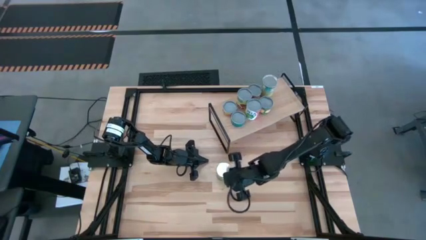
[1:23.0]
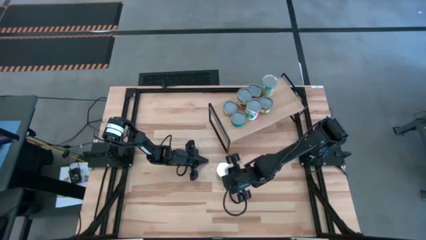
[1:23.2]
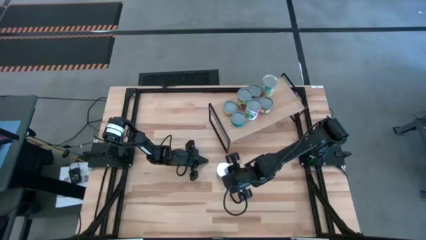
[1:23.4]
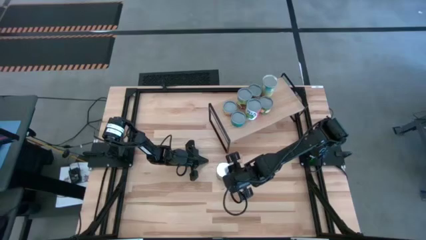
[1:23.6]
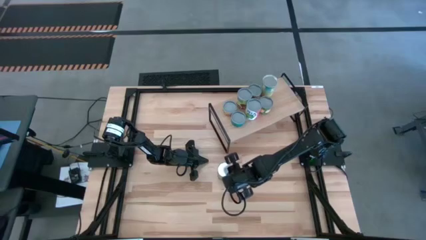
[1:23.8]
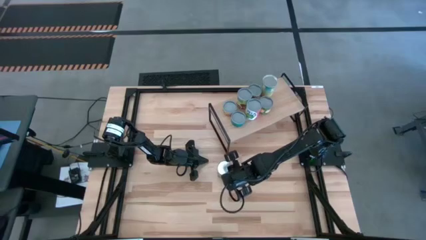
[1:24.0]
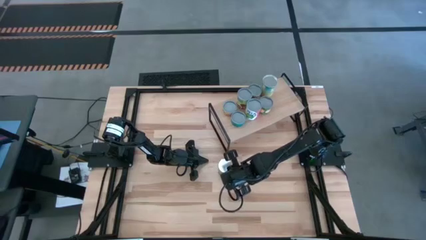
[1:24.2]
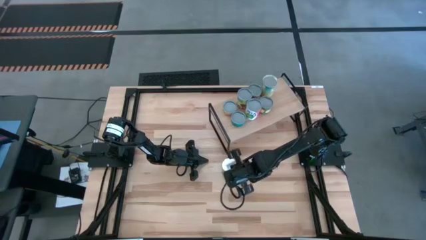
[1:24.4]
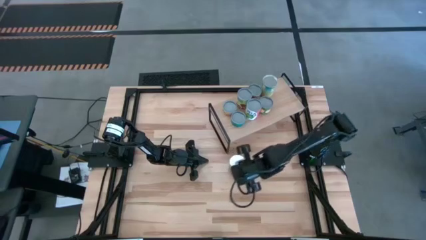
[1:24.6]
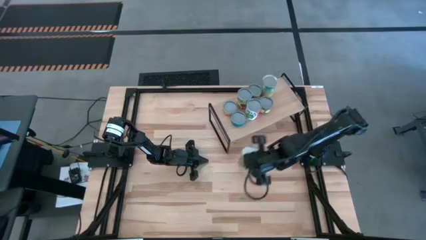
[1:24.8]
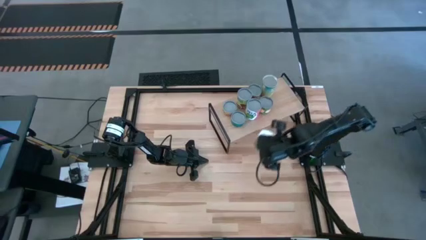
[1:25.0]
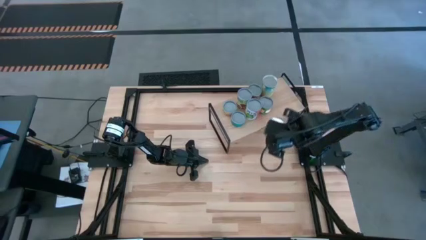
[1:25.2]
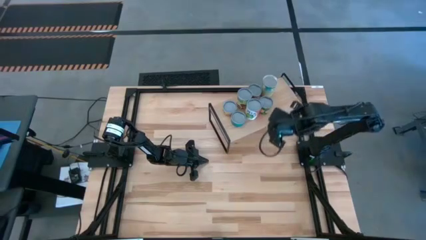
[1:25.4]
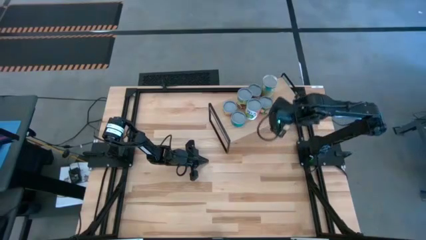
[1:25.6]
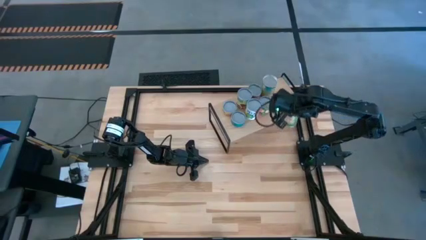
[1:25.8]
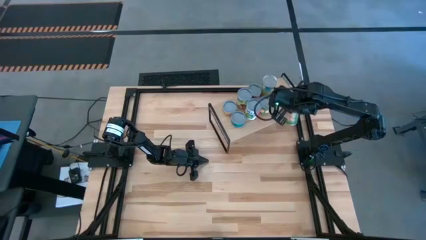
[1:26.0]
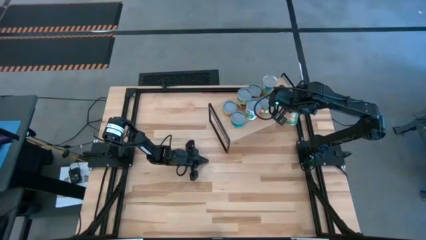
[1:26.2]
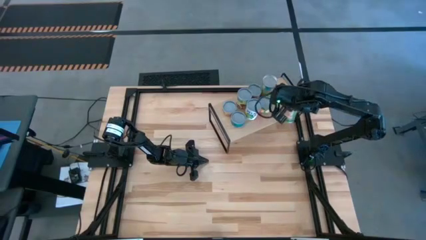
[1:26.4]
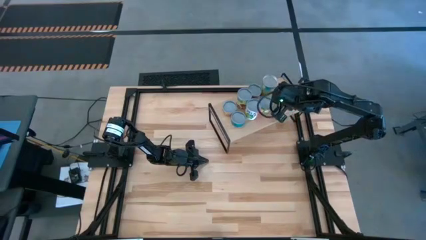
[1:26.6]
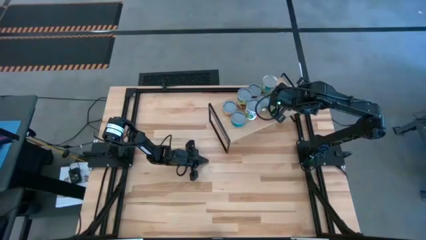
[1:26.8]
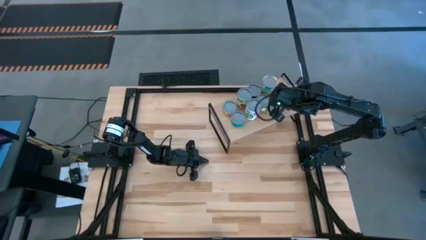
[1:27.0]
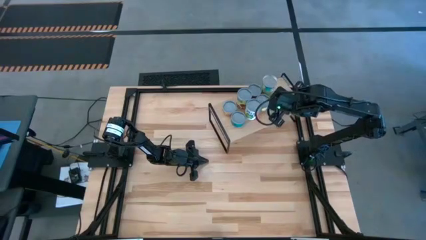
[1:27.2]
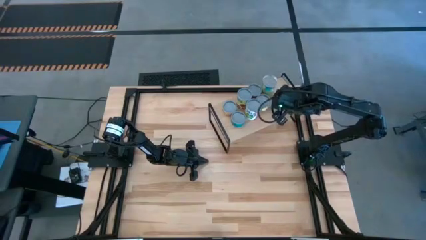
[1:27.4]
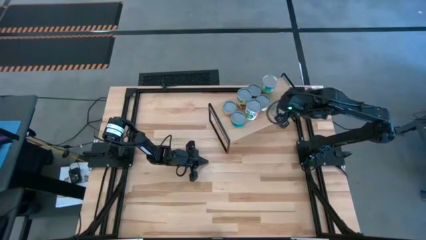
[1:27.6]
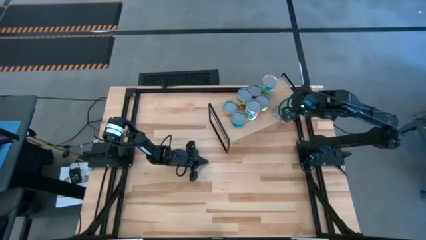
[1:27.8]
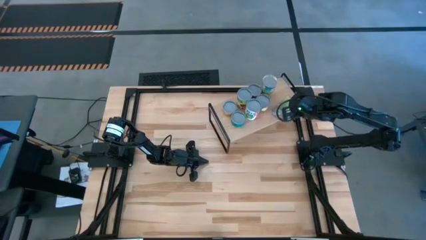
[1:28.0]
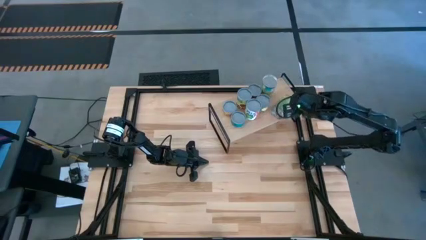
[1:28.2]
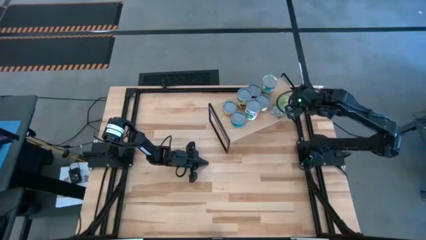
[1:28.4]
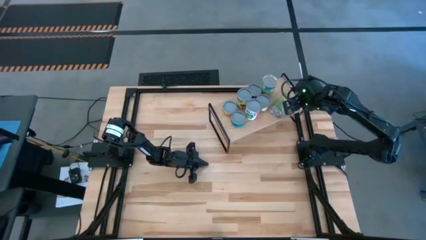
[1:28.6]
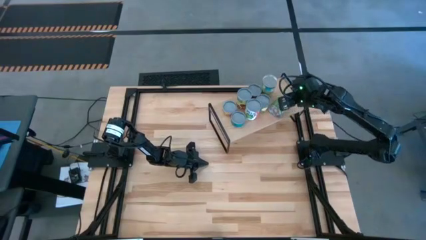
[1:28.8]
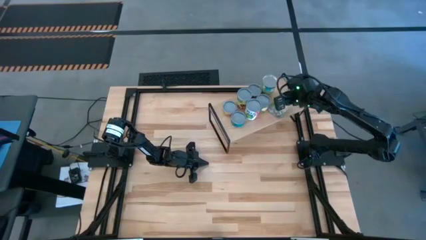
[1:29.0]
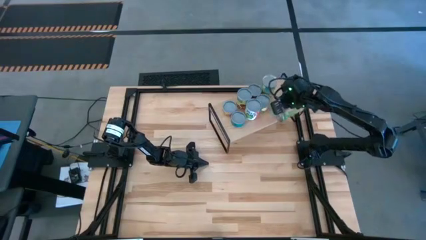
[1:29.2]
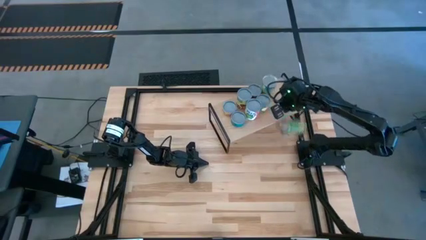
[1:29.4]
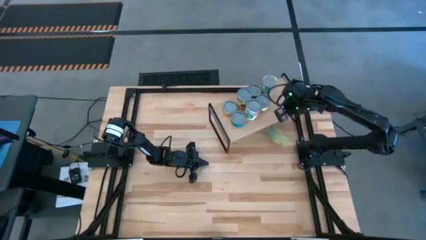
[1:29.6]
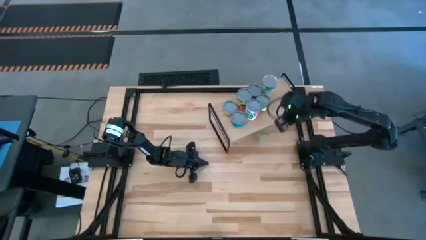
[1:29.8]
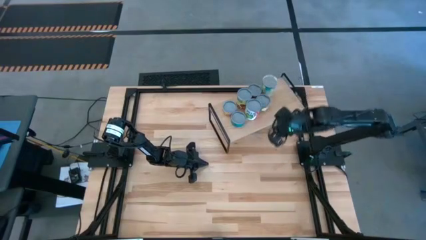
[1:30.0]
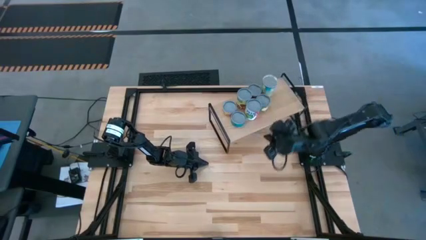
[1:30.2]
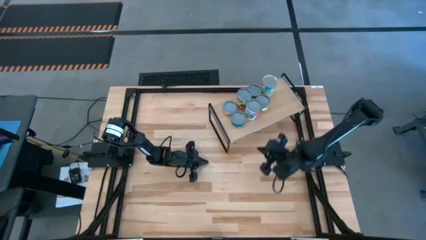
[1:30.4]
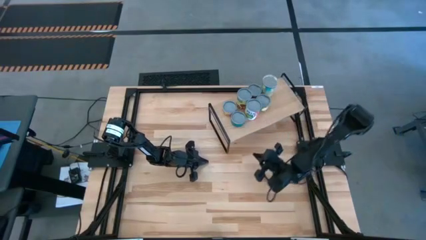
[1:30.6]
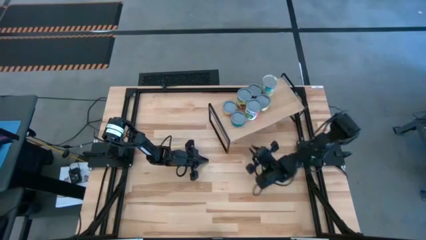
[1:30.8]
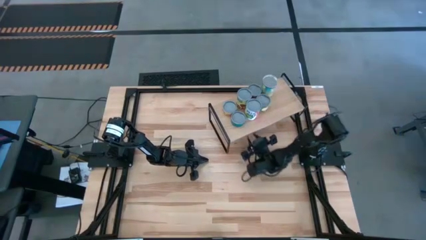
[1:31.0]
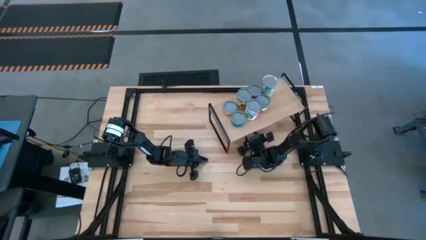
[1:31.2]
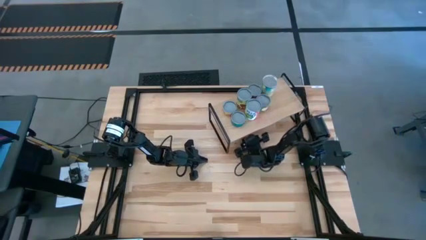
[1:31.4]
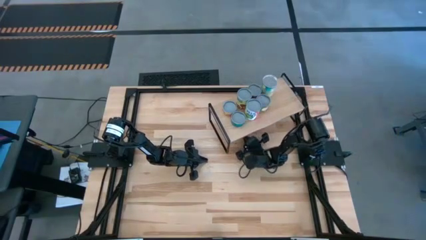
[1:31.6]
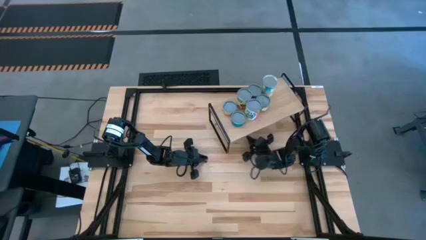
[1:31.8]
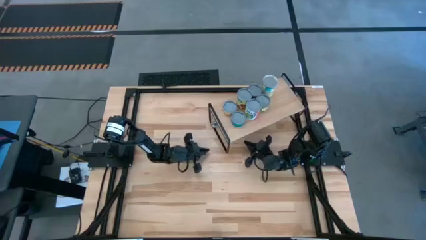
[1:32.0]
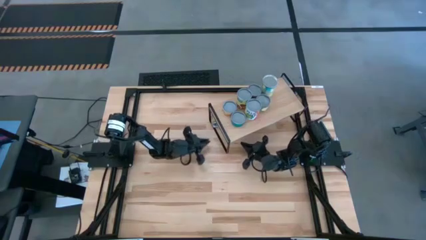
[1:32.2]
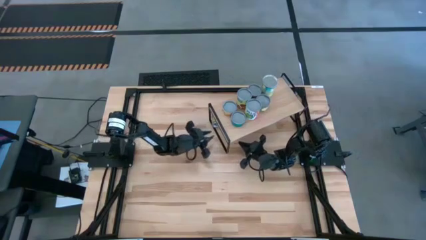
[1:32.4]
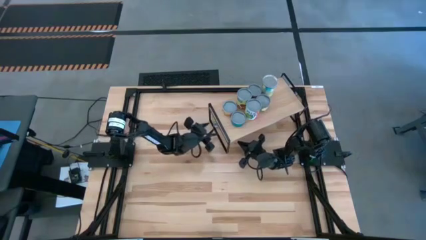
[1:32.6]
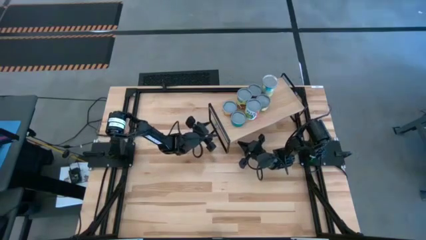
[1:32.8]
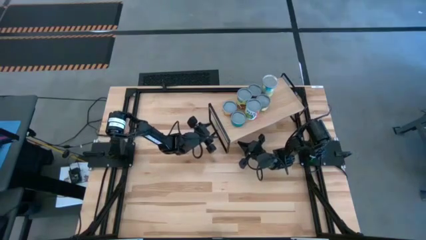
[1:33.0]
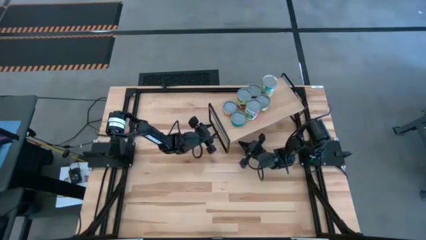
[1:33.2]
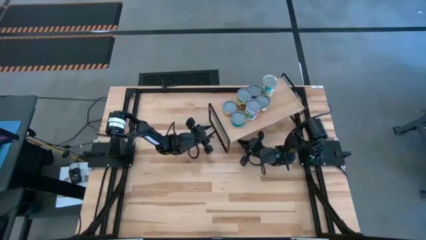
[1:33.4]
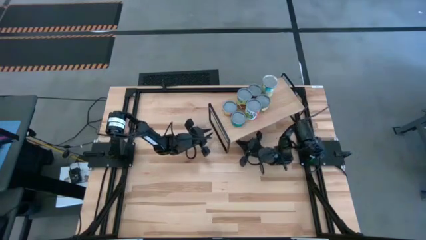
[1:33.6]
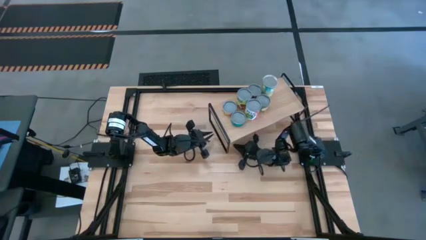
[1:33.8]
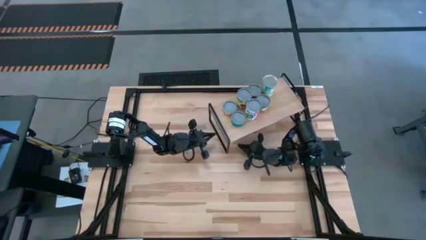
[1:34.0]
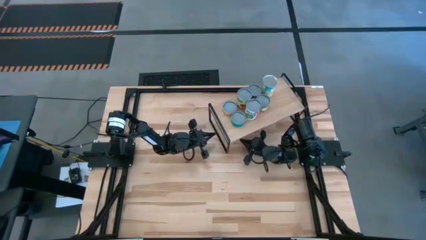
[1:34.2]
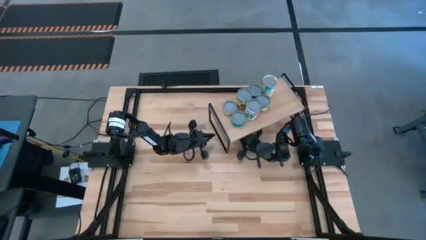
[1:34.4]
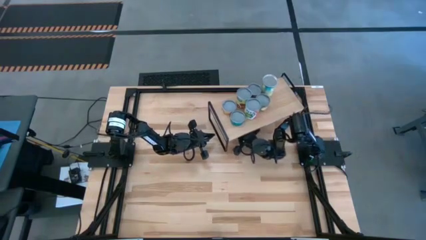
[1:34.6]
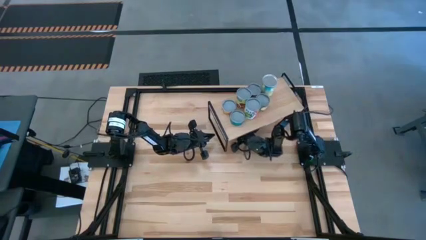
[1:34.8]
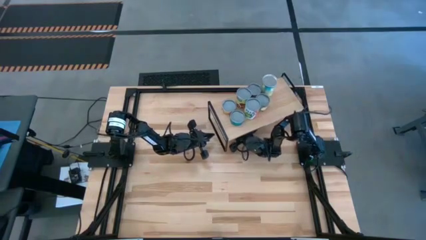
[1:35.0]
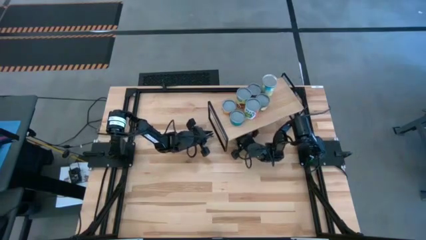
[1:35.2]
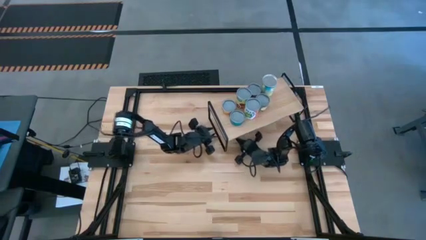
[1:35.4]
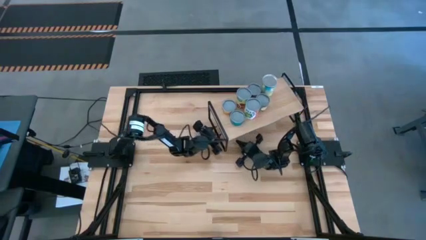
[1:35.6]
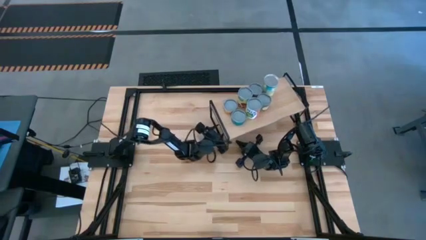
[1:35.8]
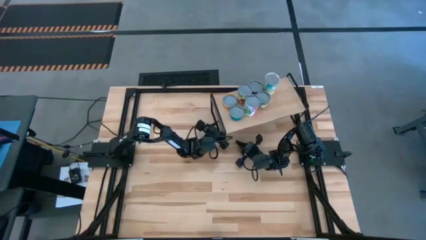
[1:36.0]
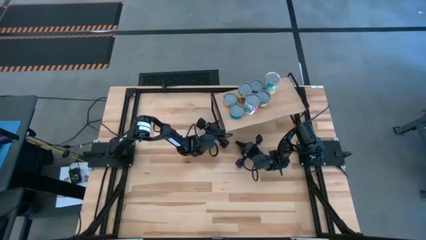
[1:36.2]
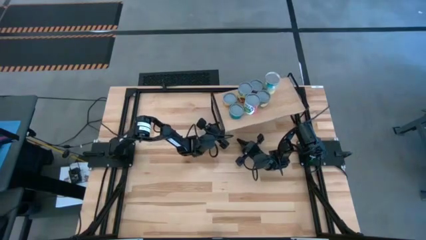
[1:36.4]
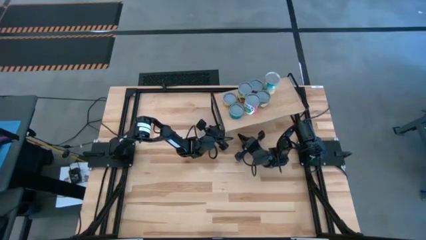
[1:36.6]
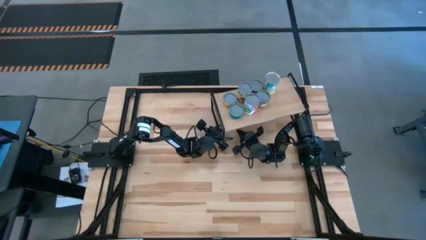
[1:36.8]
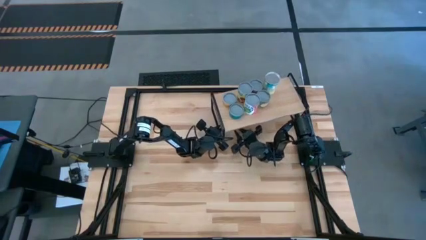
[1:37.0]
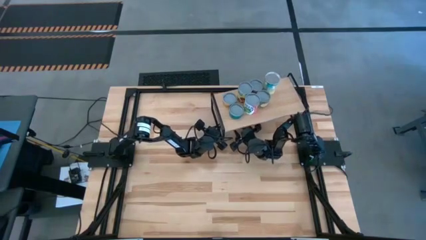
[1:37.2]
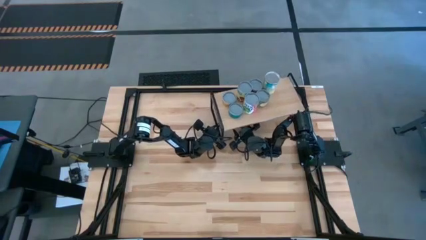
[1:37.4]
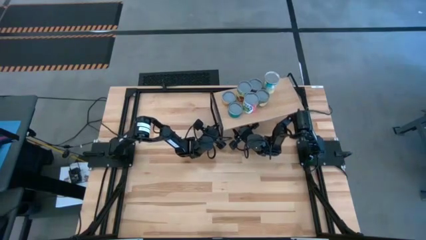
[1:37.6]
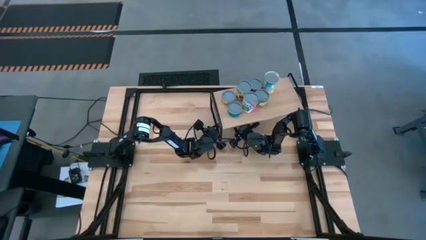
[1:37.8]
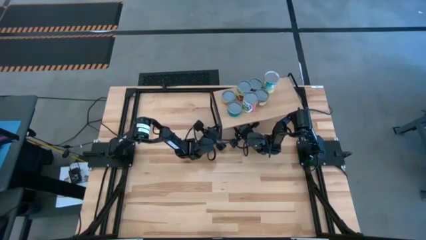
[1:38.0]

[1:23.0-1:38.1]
Task: Pick and place cans onto a shelf
Put the canned oranges on the shelf
